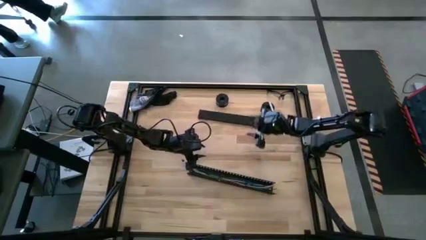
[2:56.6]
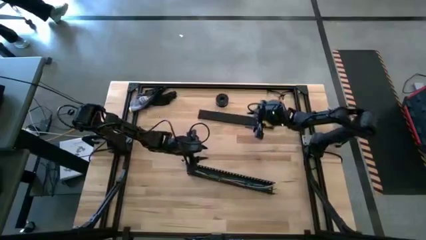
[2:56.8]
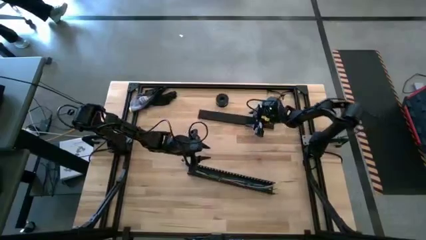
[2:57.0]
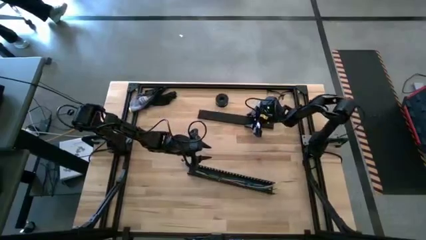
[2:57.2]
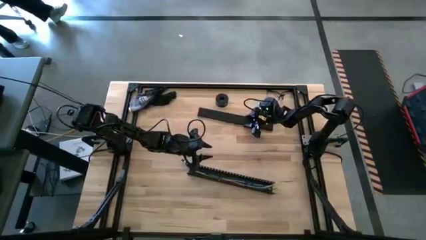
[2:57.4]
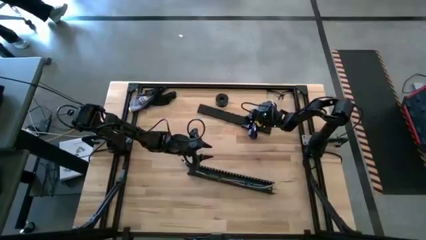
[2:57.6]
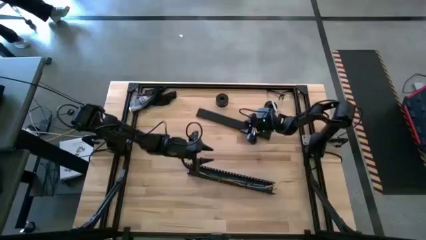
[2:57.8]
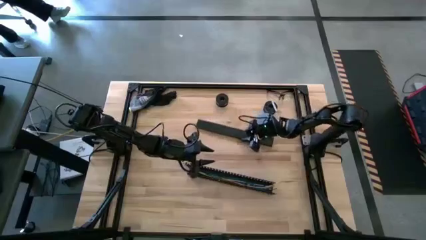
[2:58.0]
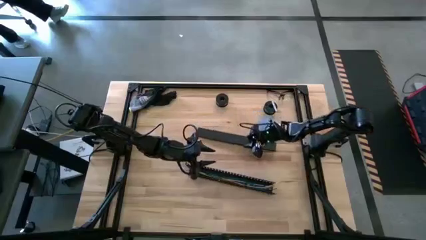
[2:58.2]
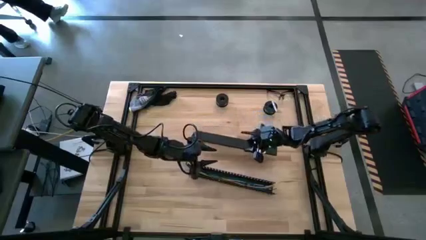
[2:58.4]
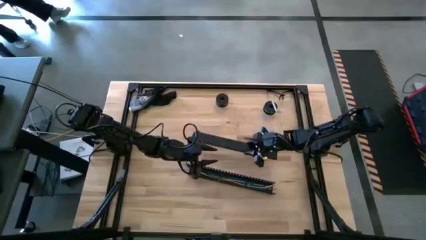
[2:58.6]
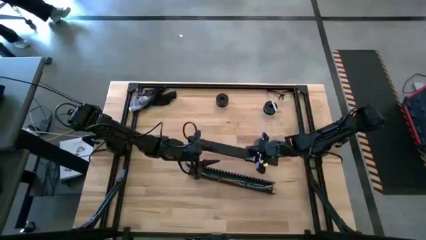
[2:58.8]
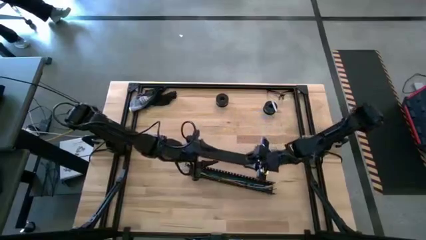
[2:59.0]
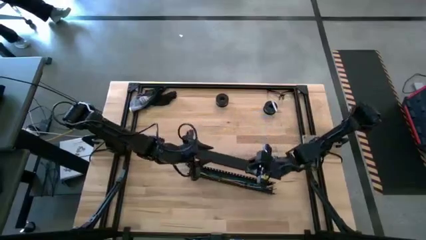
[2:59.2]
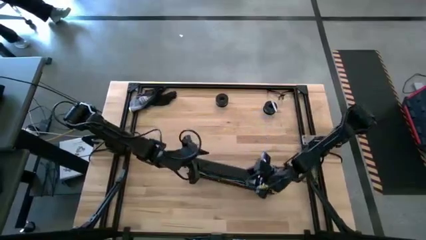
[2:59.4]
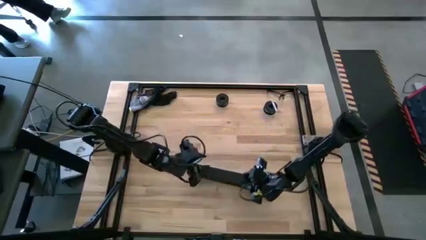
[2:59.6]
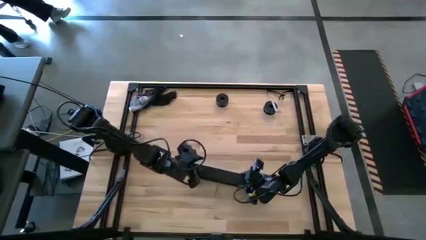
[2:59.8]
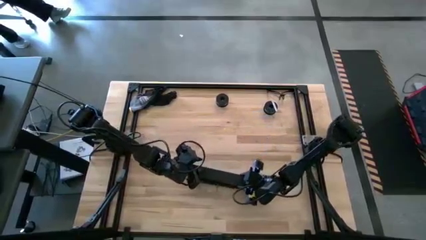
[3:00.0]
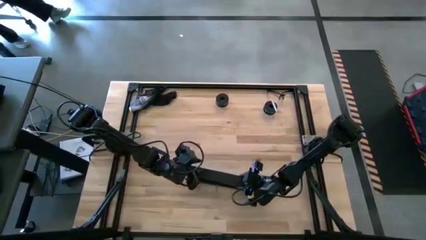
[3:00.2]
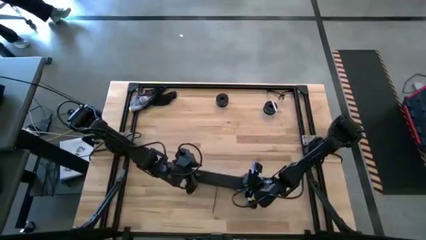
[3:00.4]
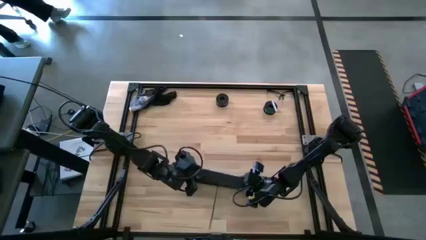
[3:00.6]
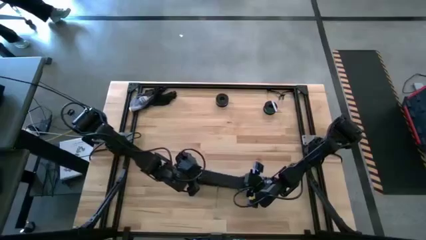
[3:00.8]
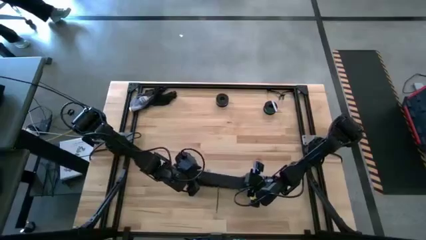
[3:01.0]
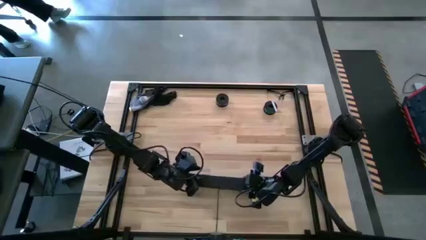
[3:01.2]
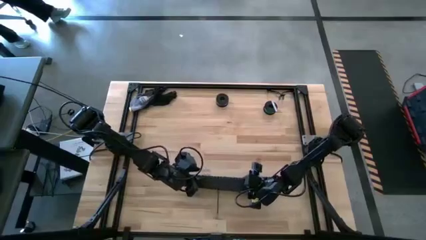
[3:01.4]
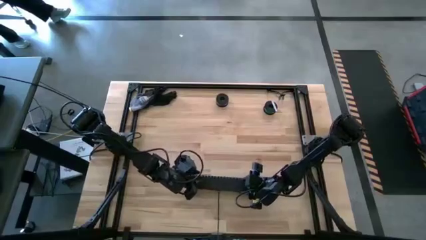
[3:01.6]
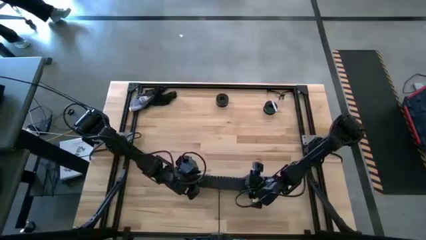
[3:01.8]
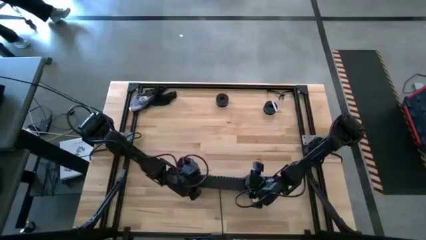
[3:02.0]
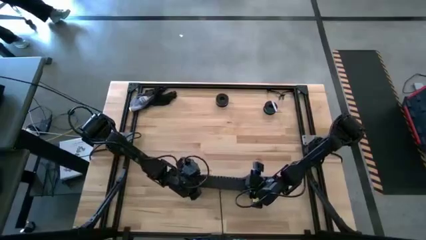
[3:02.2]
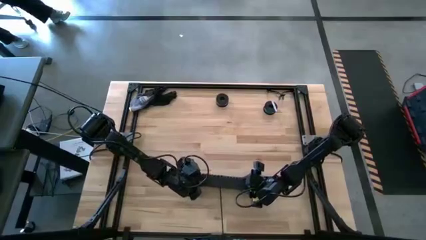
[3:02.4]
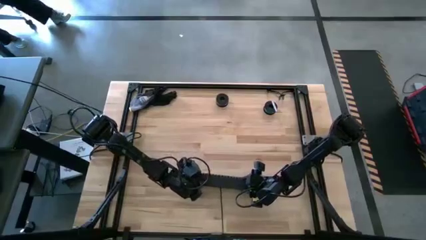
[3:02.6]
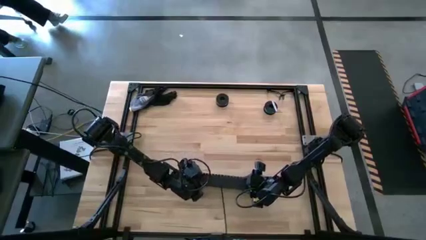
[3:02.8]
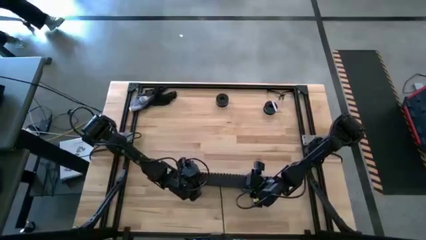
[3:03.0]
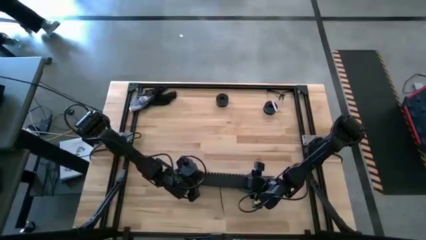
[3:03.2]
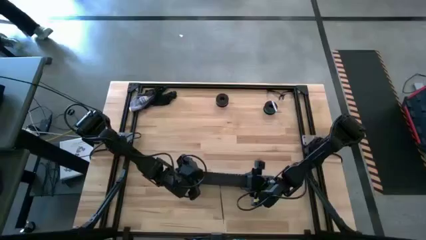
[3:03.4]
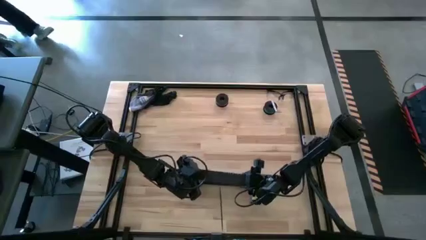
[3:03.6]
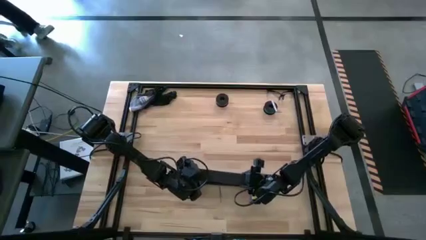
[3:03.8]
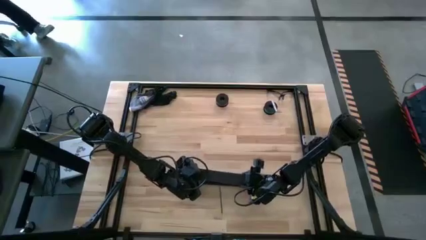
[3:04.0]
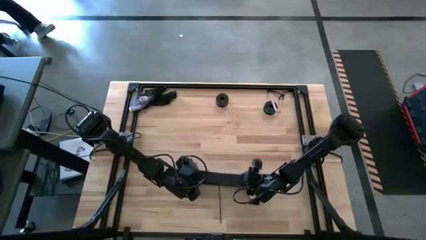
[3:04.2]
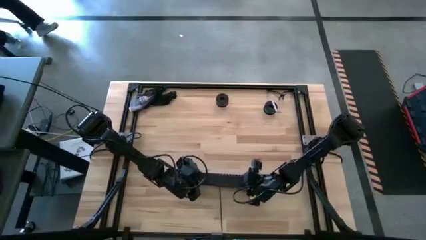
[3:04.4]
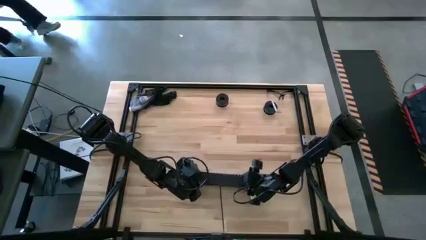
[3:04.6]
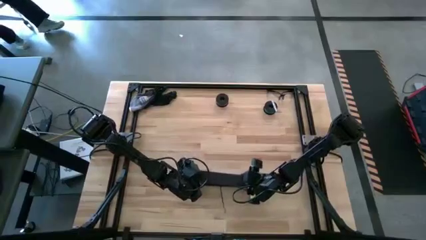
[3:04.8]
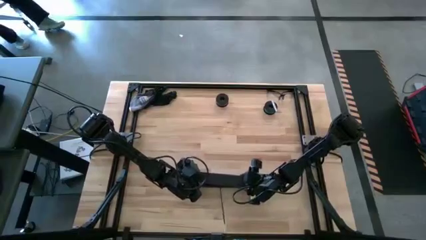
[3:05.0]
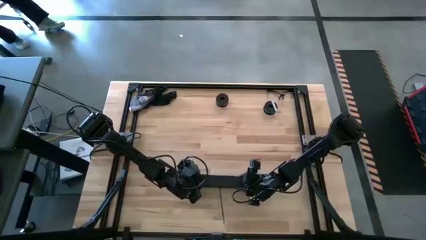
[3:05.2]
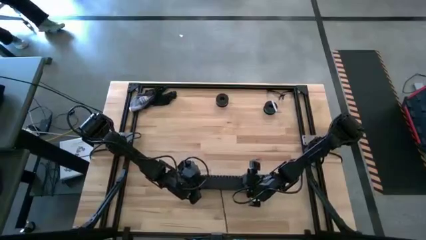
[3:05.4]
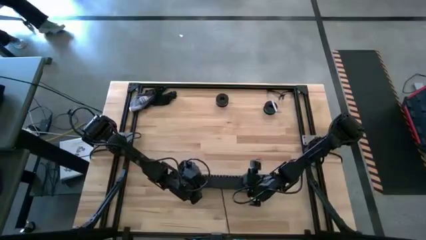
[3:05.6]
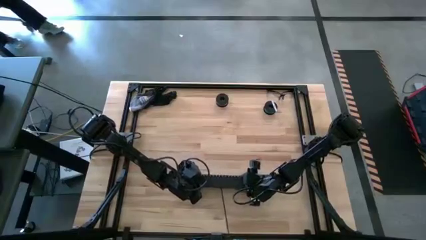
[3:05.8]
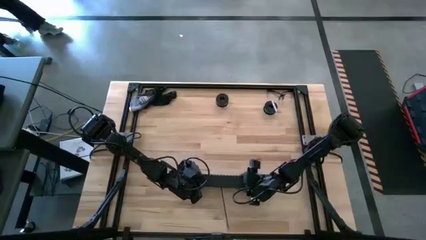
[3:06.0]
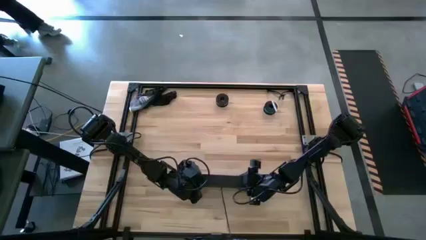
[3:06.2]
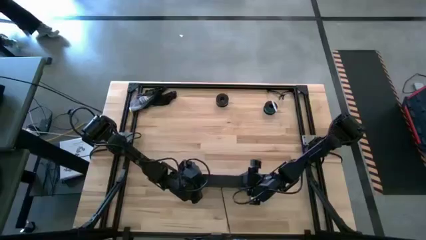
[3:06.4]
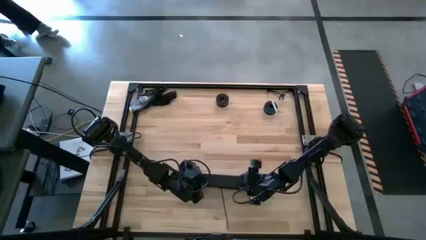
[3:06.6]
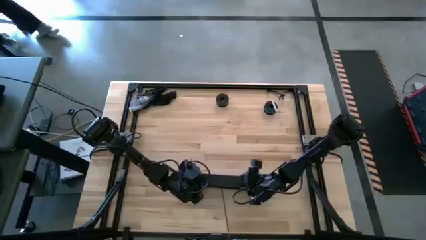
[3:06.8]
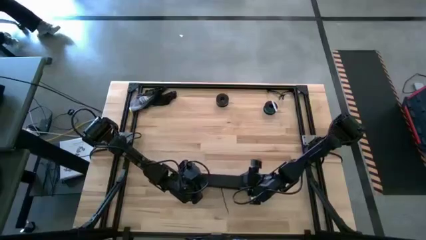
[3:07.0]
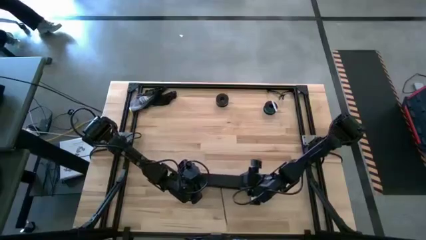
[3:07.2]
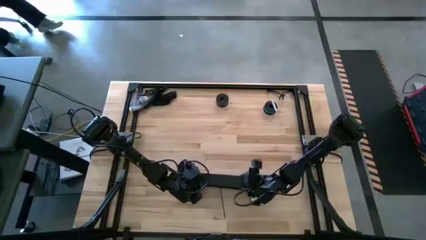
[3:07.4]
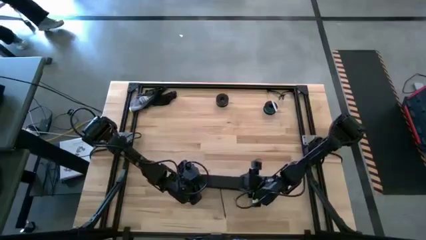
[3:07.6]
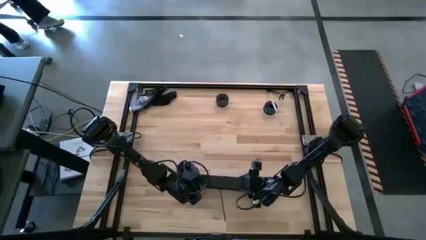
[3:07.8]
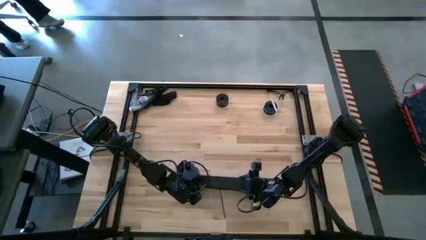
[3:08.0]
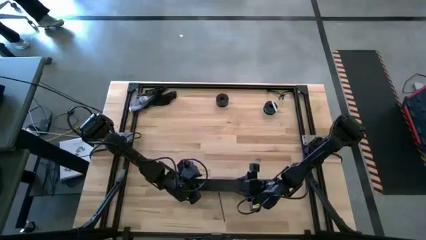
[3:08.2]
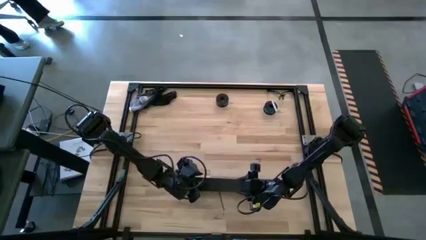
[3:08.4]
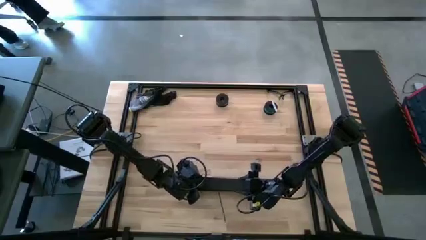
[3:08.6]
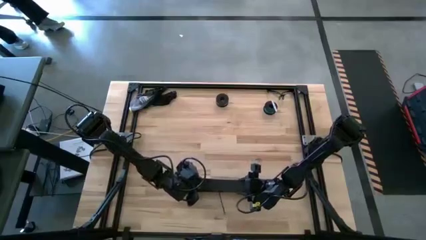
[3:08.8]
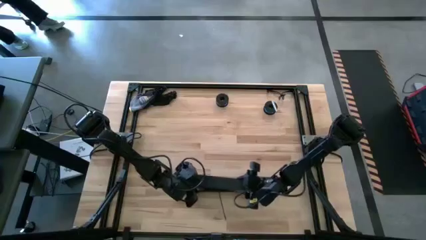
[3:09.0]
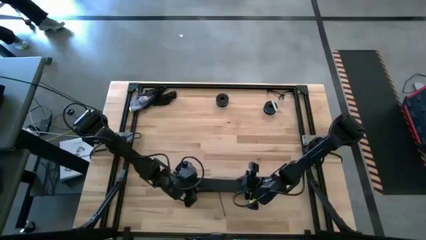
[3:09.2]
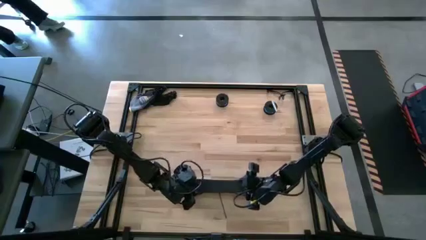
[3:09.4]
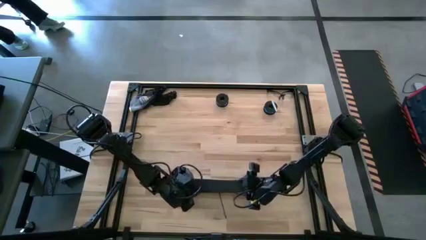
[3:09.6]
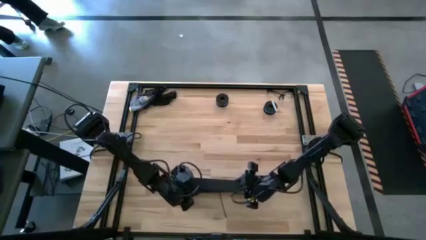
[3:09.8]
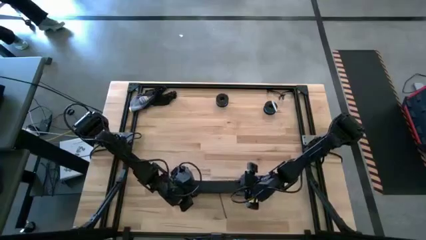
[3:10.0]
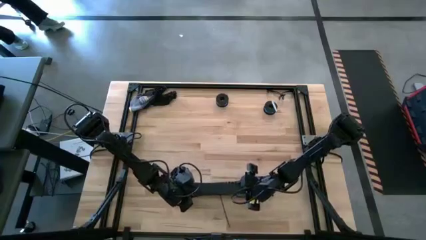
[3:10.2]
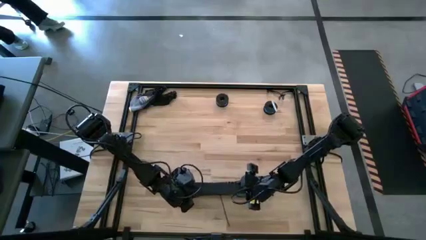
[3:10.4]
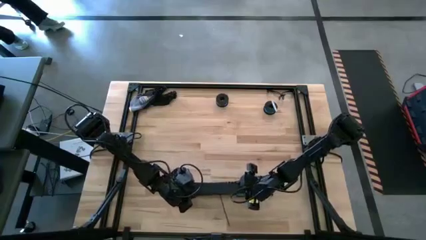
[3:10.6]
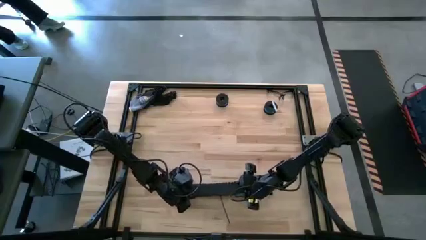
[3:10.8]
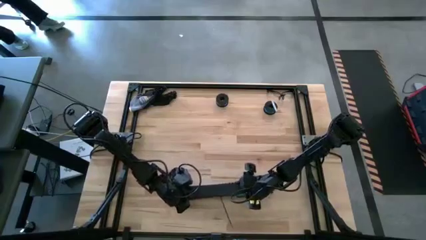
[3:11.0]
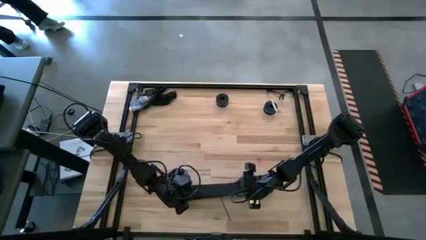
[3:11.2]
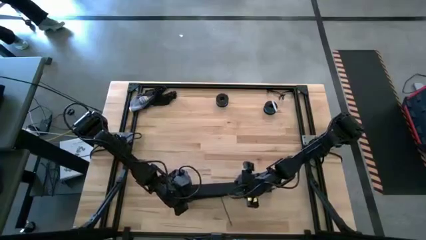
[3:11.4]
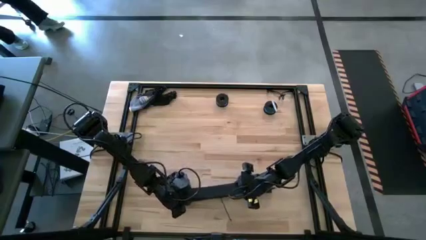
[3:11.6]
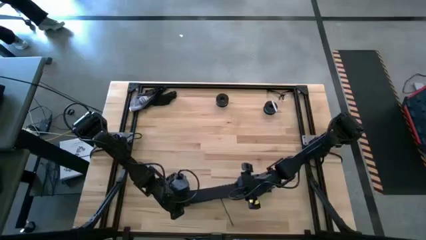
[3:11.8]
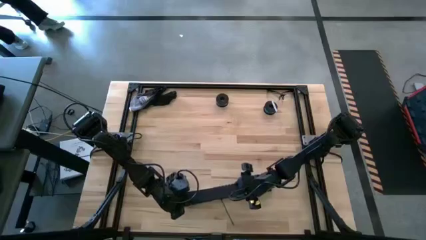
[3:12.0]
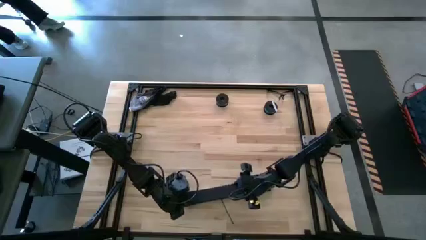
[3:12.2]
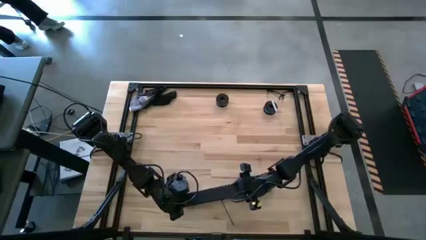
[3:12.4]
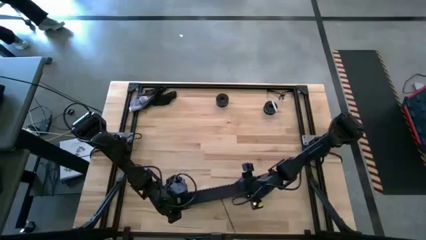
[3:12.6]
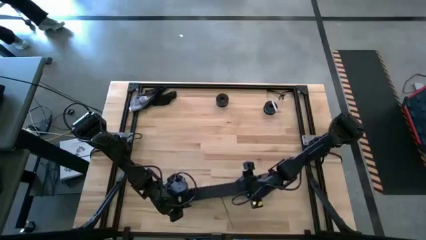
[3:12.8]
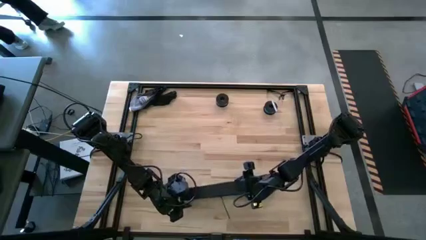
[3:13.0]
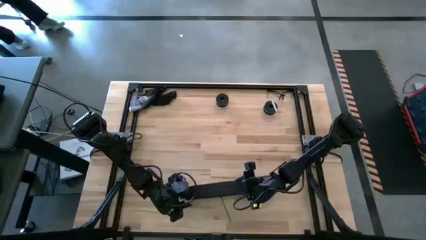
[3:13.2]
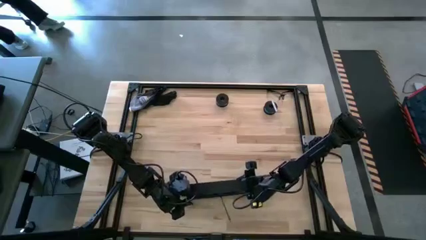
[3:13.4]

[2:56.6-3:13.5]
Task: Ziptie cables
Close the black cable duct
